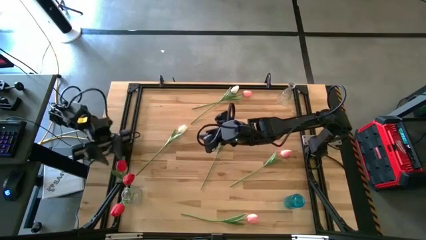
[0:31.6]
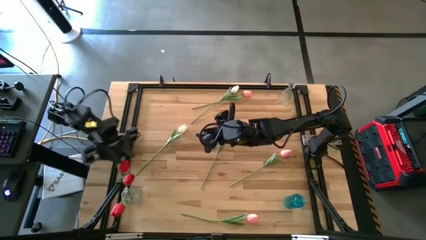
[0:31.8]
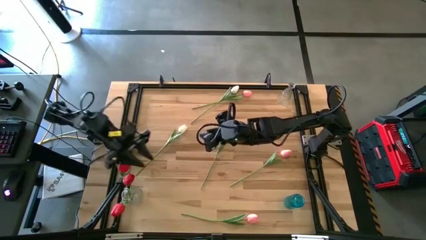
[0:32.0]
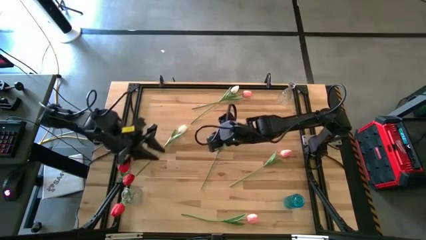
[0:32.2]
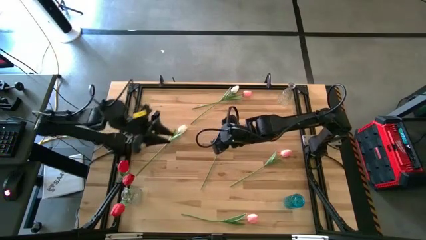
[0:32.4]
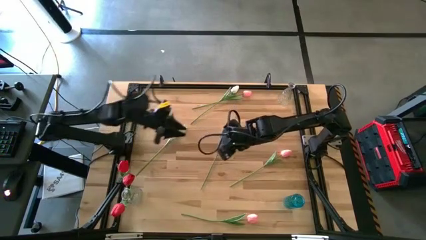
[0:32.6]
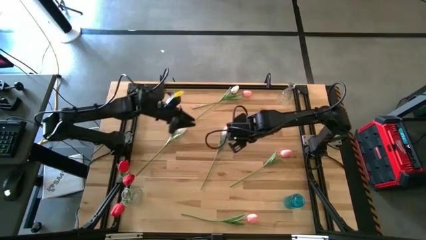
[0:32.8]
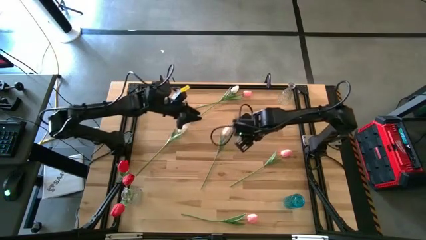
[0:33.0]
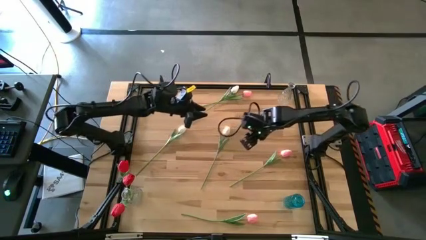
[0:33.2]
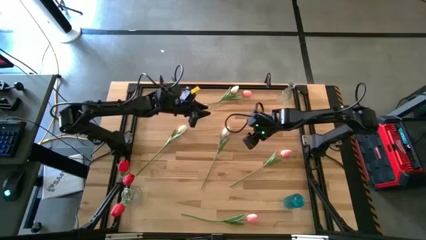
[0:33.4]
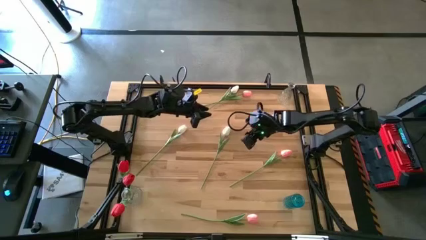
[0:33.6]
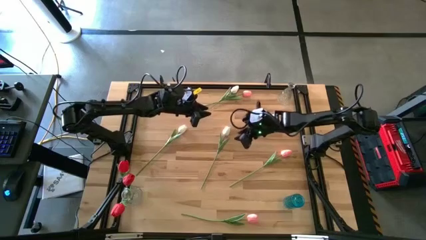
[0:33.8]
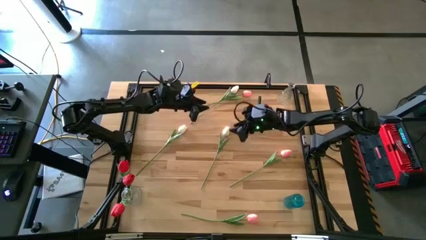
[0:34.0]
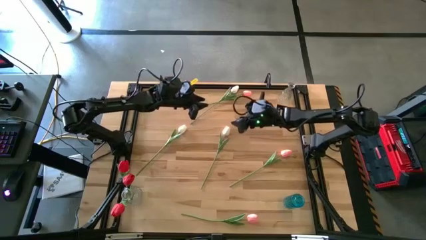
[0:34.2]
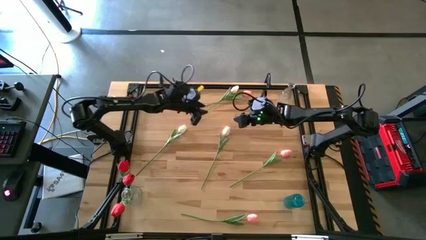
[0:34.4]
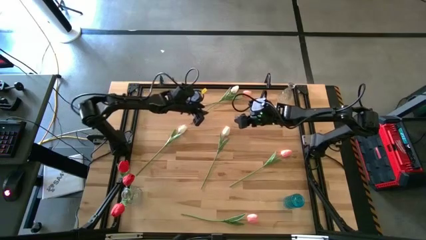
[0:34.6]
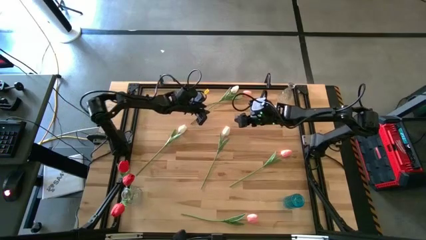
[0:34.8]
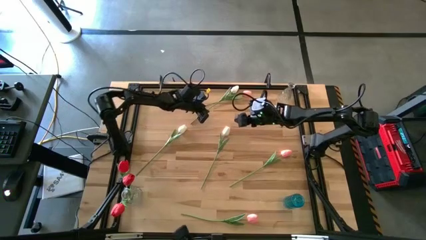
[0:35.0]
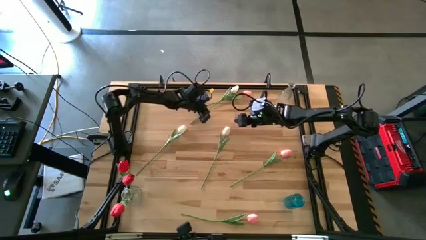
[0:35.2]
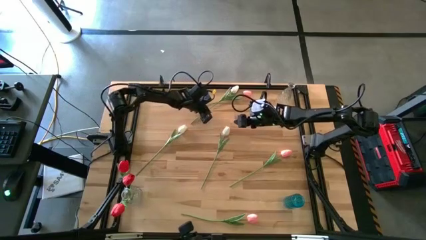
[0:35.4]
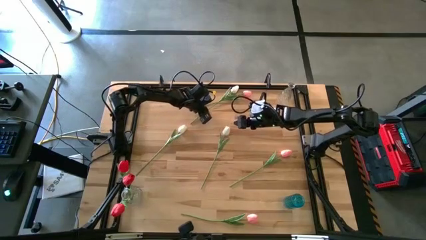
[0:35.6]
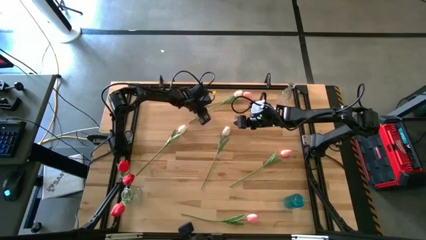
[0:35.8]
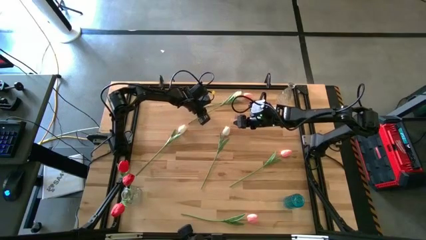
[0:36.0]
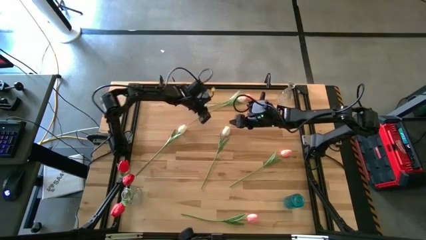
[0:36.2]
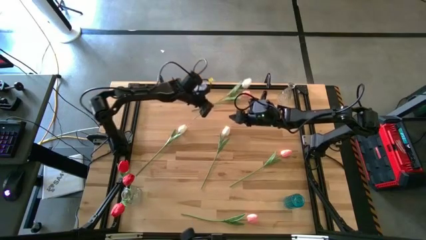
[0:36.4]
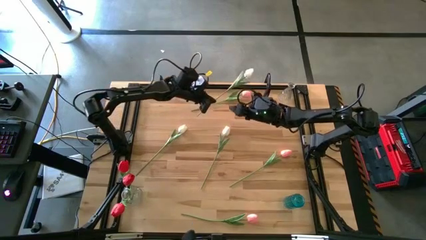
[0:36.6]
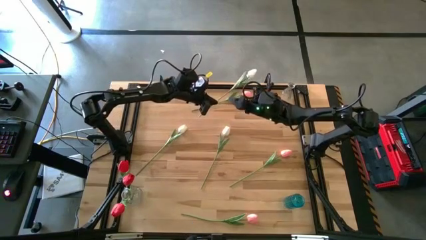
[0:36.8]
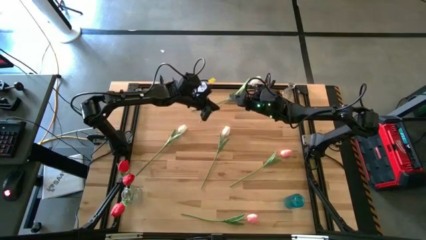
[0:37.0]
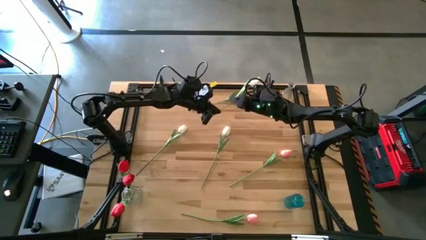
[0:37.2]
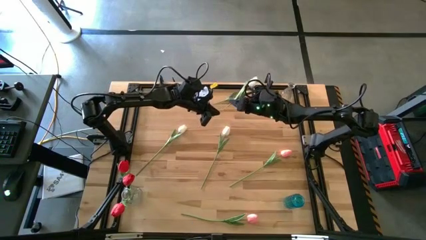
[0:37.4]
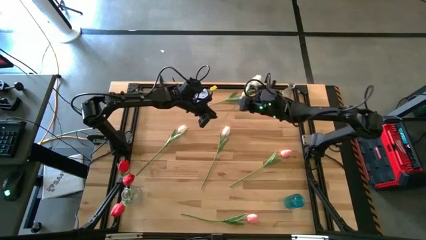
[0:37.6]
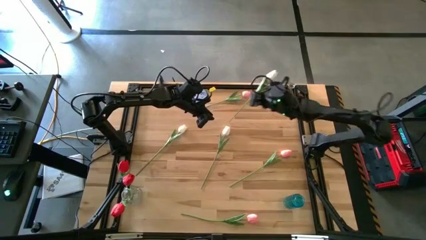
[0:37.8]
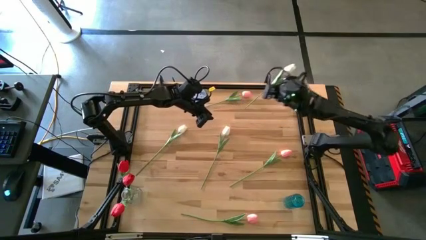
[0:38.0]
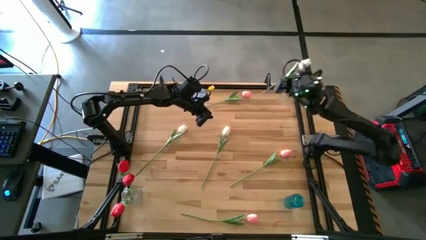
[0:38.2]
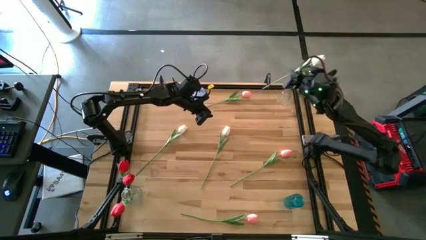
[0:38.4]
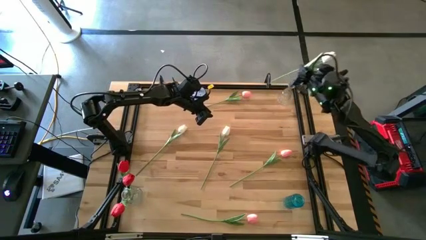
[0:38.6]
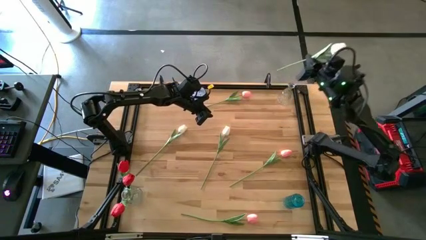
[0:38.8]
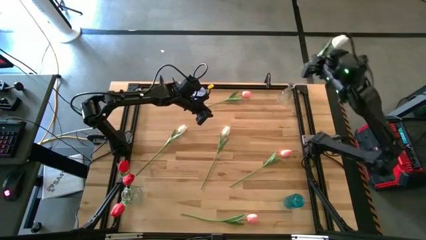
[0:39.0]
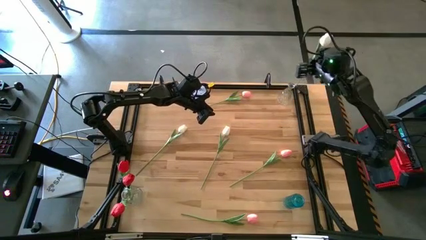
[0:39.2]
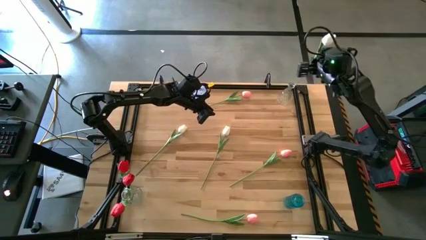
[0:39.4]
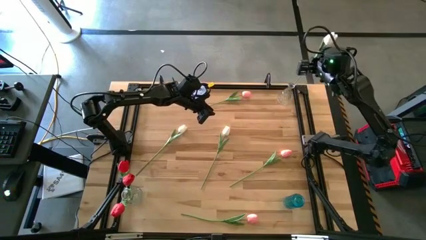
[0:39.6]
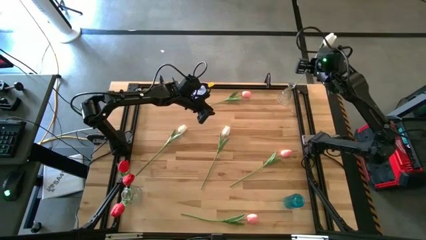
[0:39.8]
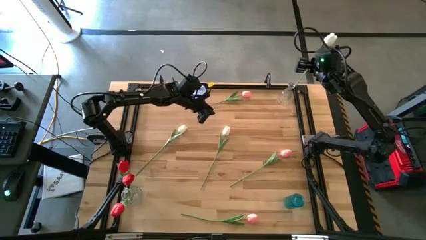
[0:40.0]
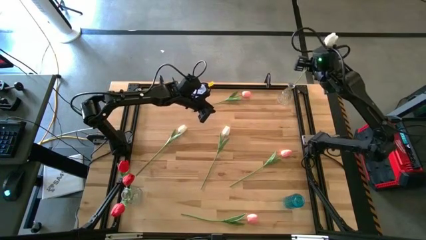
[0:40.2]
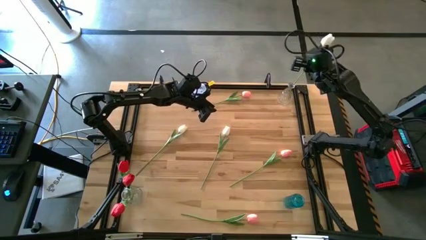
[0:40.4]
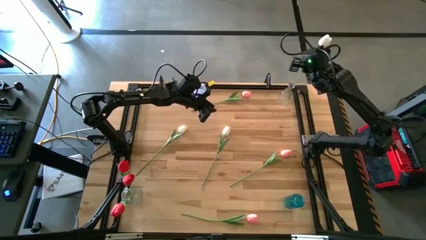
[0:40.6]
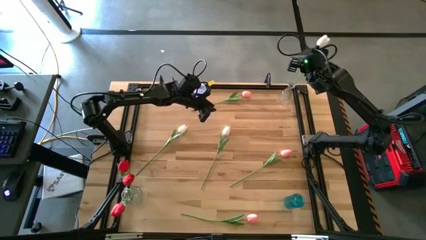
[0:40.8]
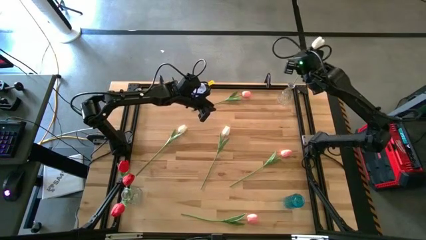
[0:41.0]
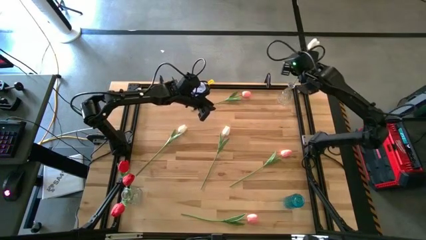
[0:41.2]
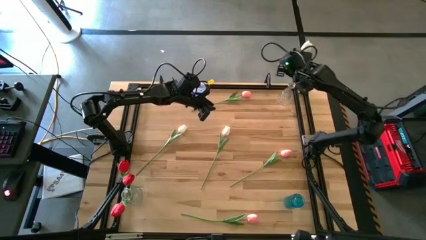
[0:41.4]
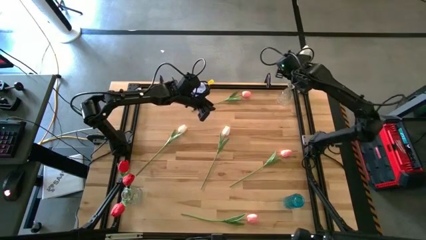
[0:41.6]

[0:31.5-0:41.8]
Task: Sort flowers into vase by color
Put the center top white tulip into the top transparent vase

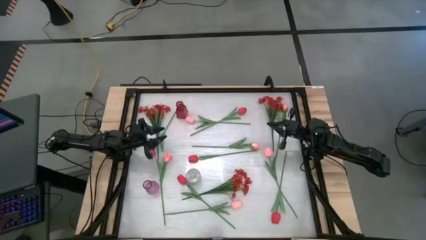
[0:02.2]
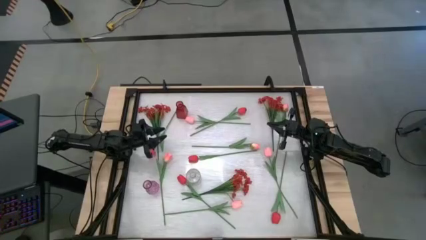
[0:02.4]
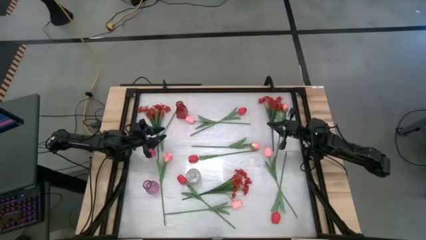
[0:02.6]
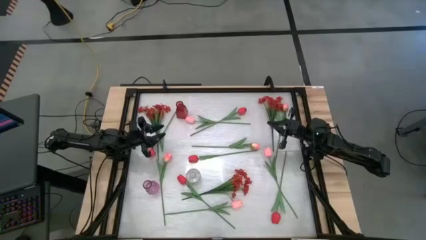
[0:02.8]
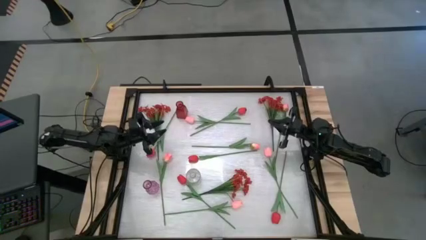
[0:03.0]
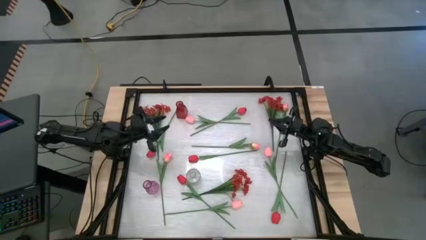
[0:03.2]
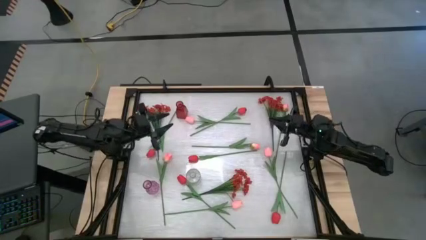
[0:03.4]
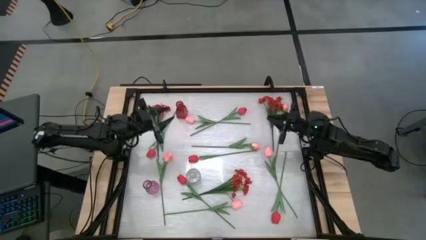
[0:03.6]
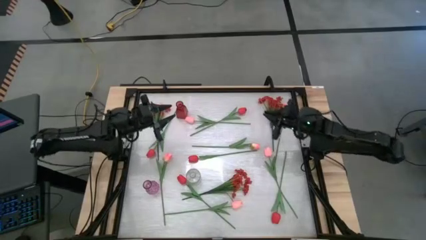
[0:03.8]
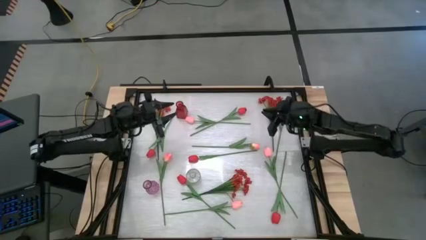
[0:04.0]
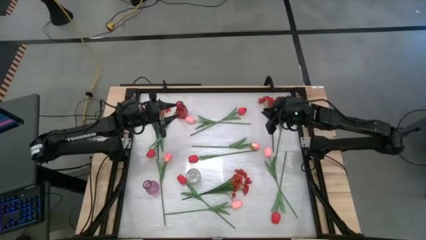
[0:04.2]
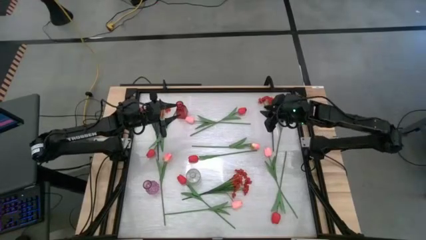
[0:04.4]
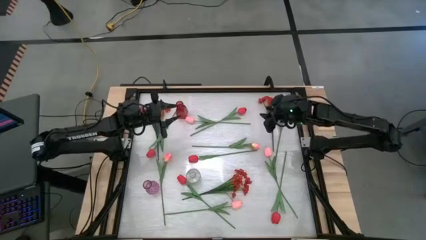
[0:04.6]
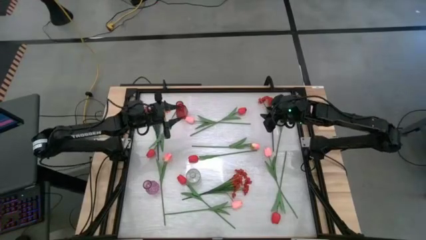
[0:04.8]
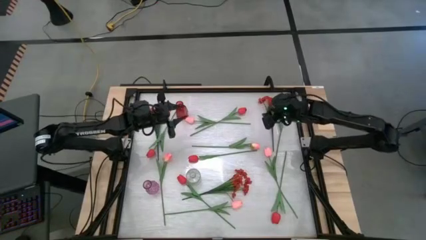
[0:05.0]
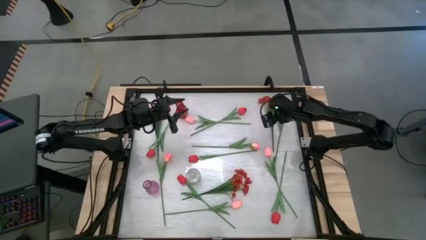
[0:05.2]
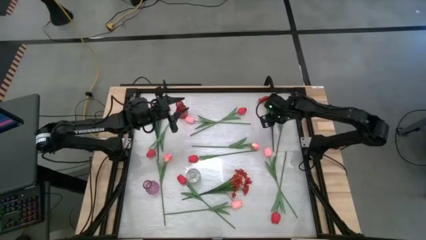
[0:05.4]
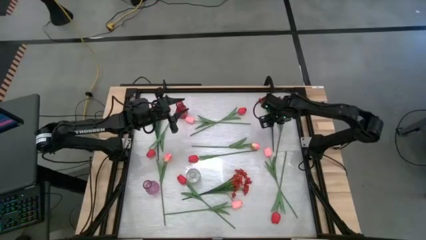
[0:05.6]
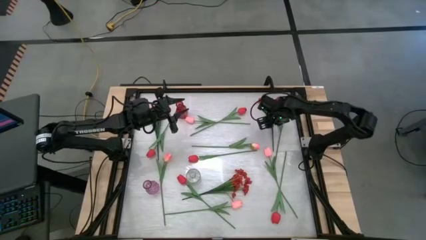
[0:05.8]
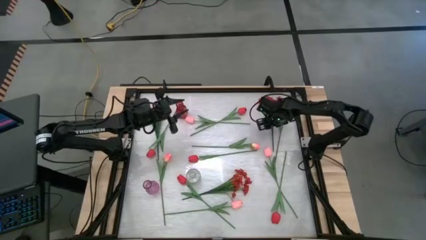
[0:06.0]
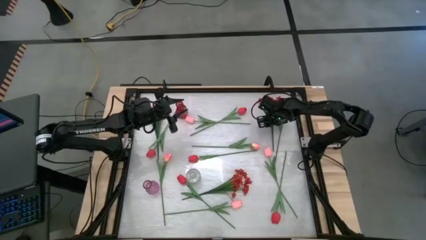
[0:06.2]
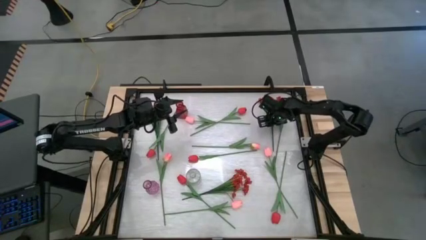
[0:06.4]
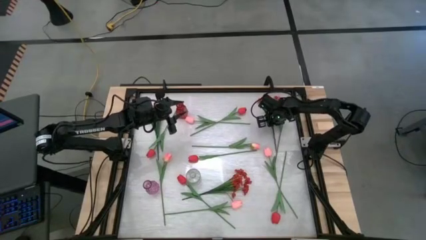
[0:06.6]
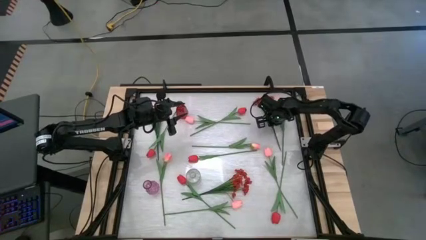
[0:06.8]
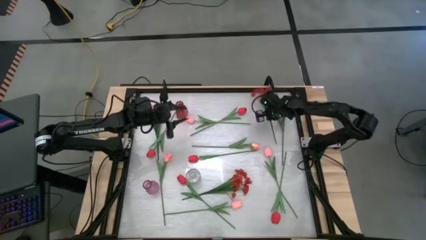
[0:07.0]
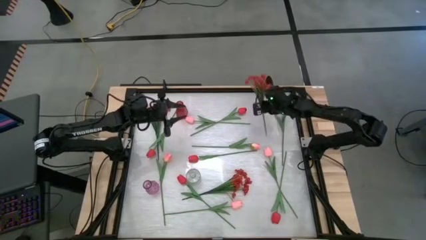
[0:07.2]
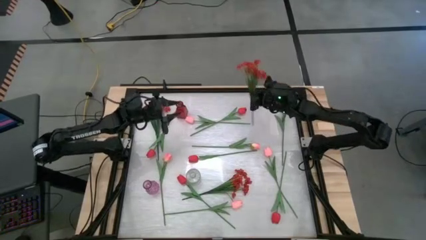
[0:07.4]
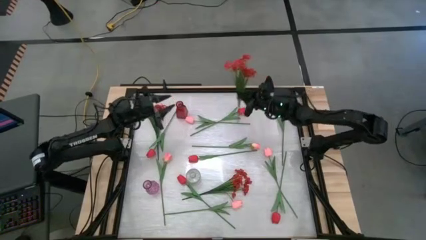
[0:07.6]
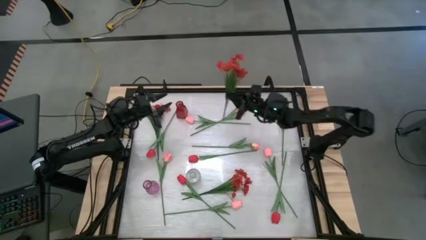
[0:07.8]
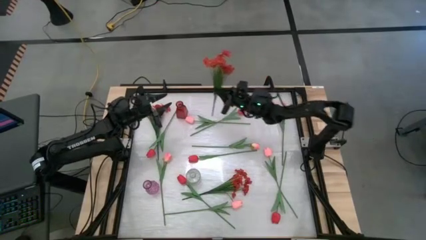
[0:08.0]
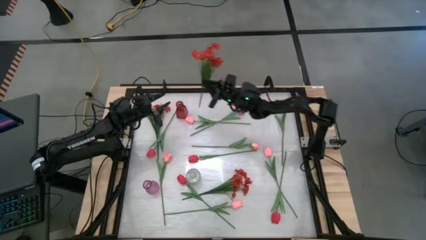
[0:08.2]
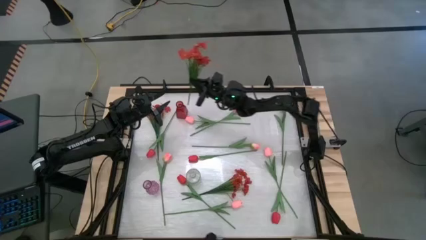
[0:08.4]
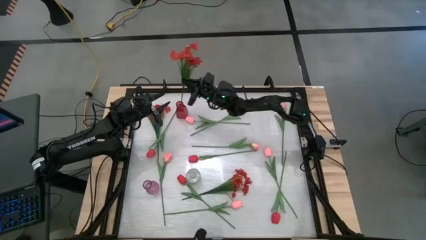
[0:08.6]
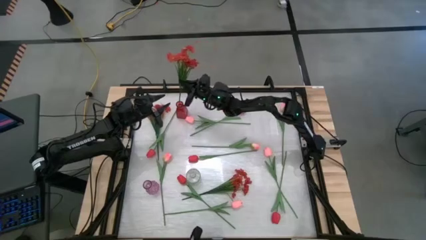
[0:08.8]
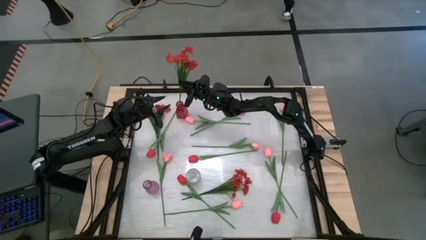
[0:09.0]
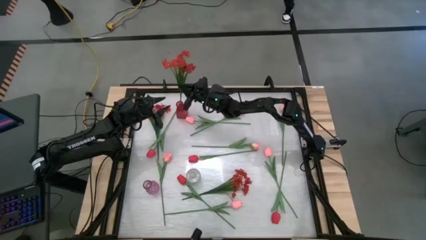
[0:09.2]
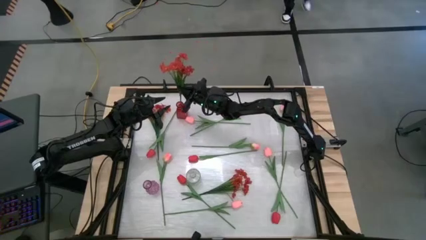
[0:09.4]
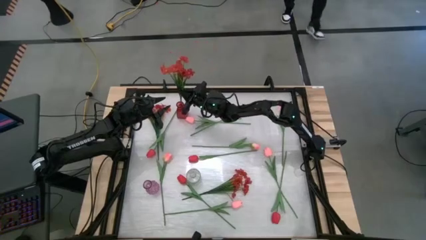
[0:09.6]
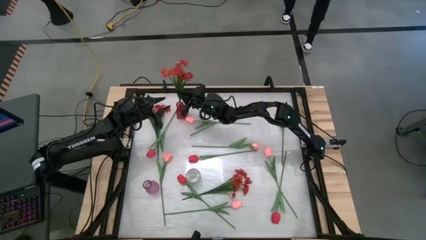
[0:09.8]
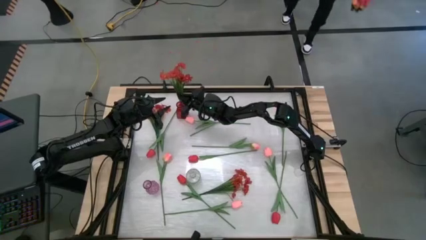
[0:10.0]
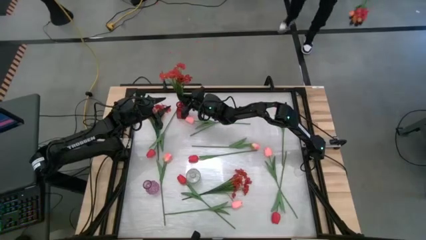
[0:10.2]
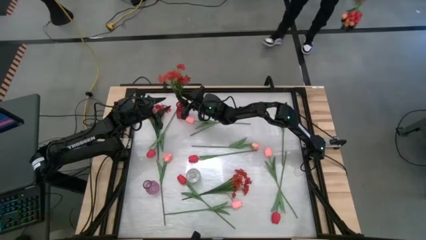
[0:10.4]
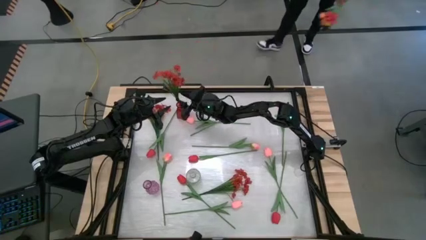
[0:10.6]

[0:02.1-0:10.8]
Task: Sort flowers into vase by color
Put the orange flowers into the red vase
